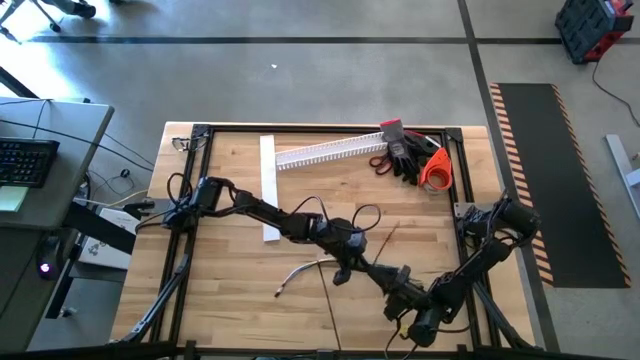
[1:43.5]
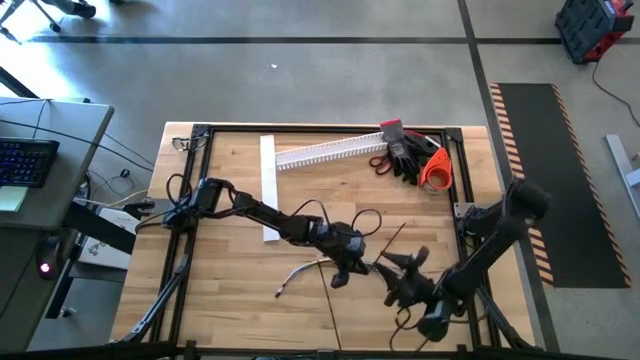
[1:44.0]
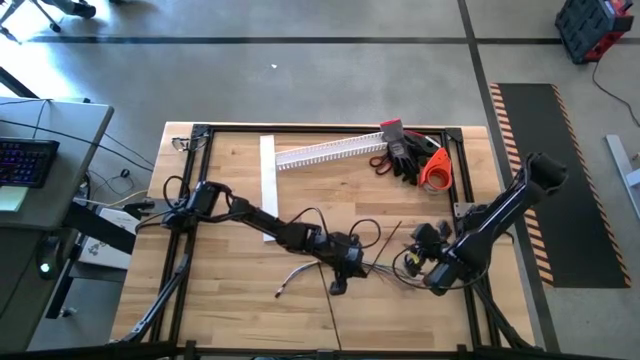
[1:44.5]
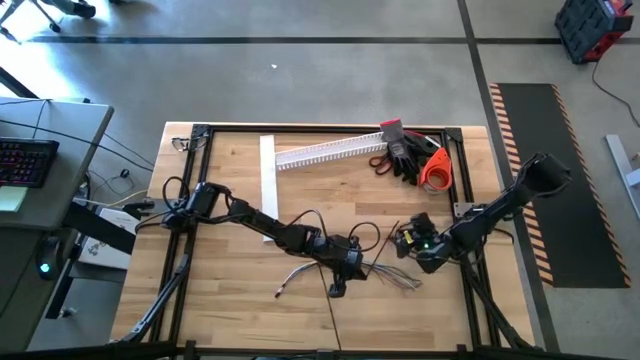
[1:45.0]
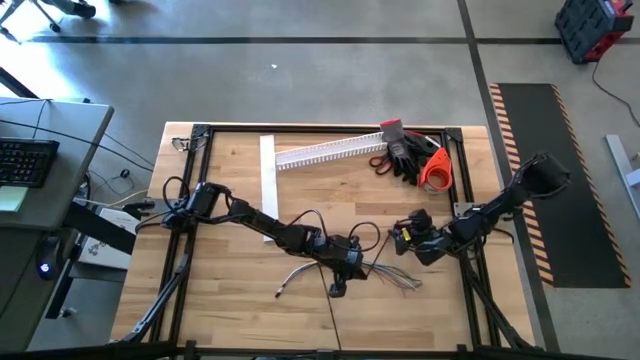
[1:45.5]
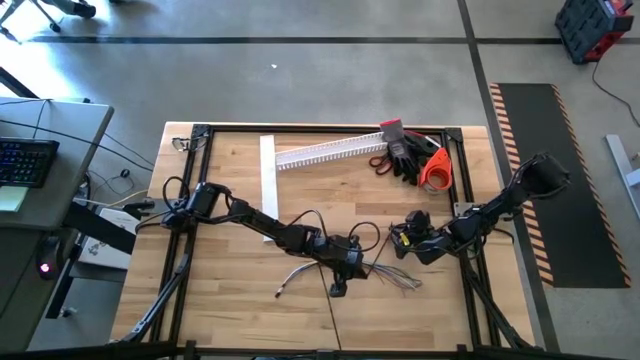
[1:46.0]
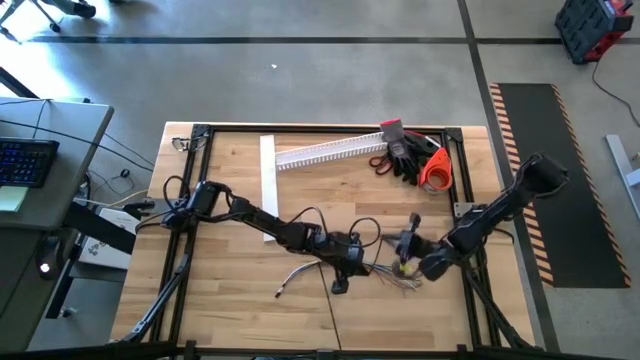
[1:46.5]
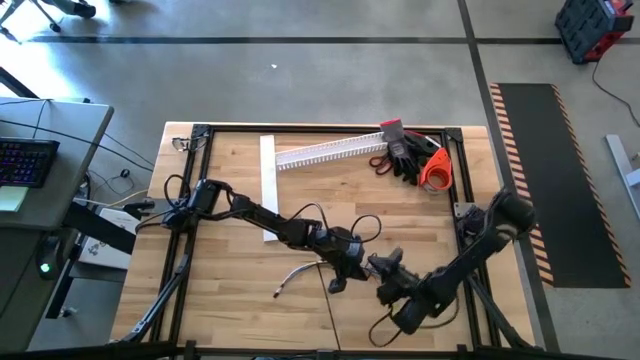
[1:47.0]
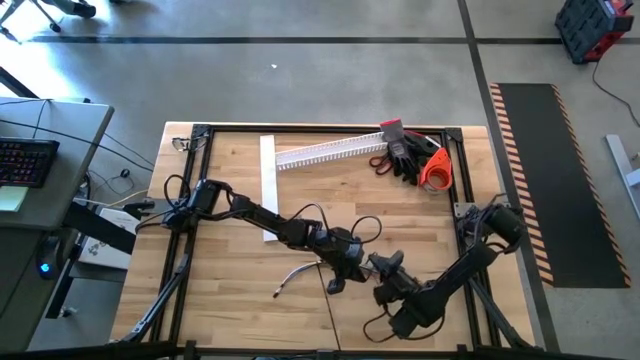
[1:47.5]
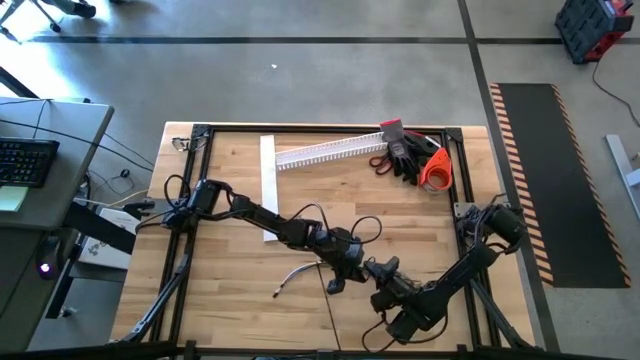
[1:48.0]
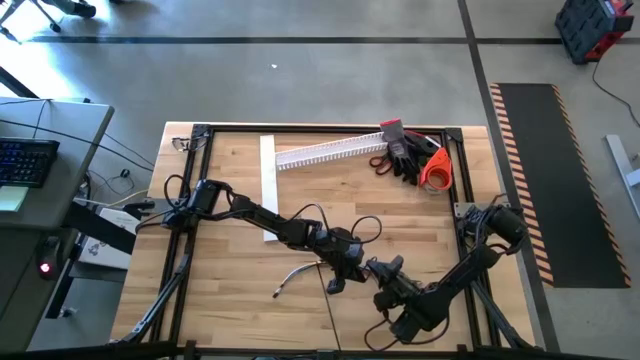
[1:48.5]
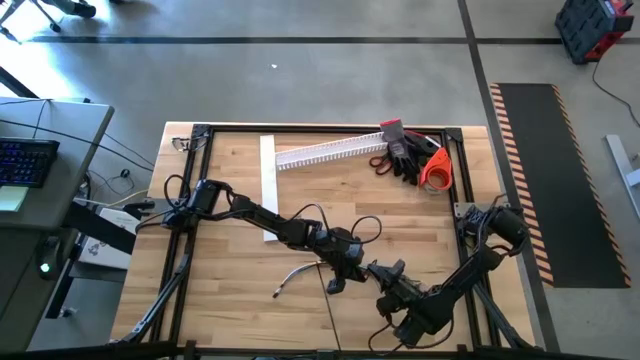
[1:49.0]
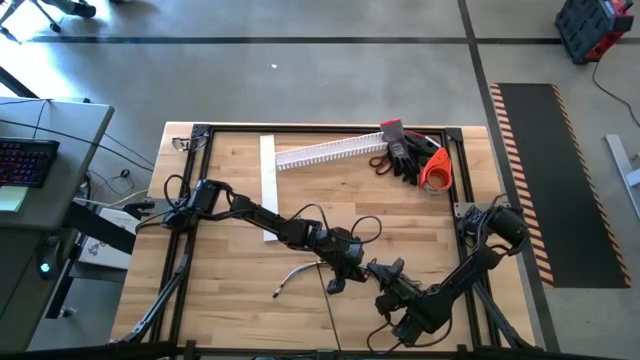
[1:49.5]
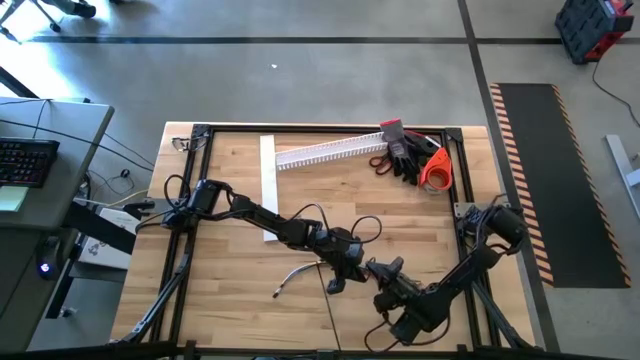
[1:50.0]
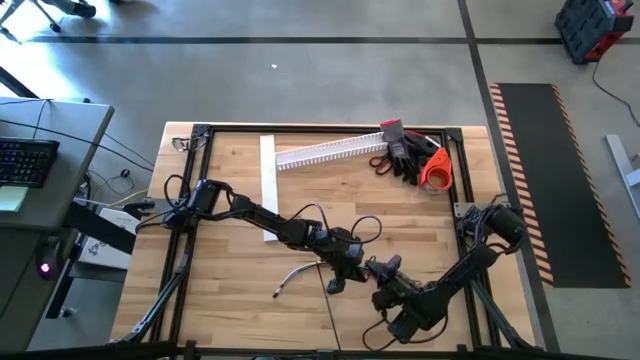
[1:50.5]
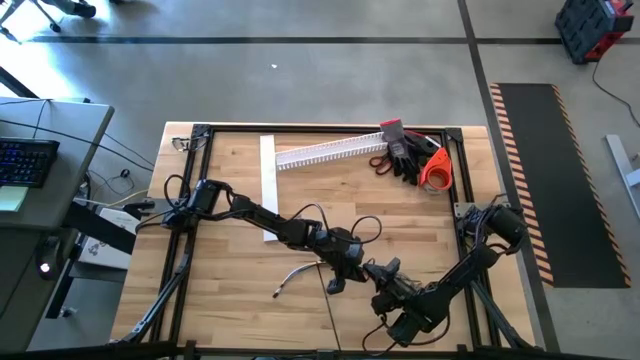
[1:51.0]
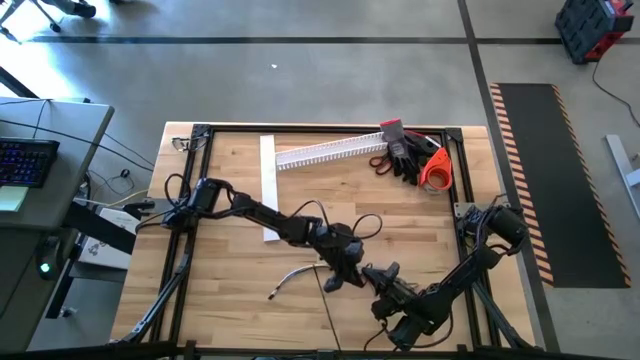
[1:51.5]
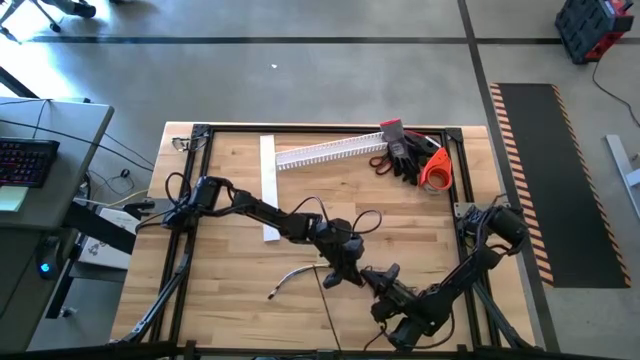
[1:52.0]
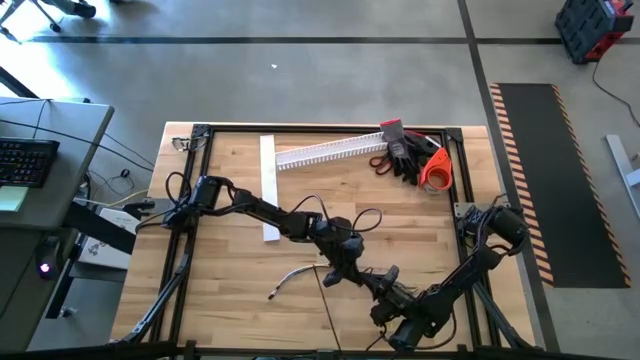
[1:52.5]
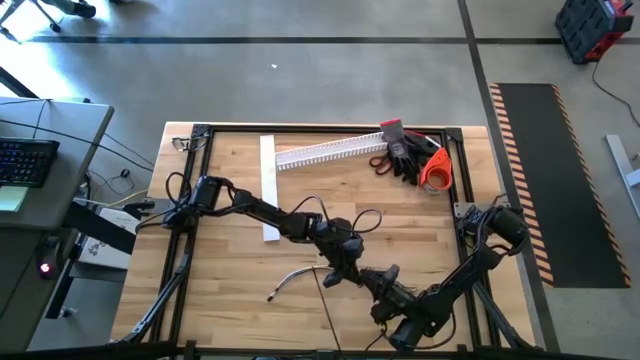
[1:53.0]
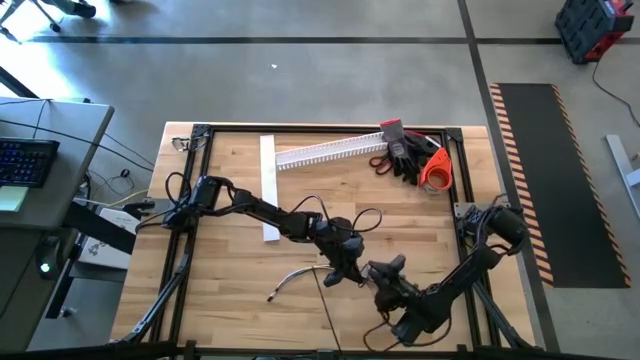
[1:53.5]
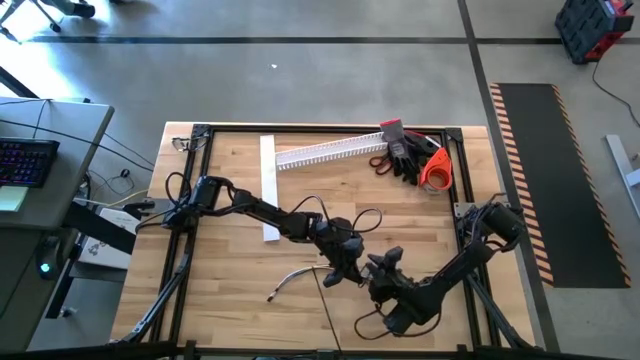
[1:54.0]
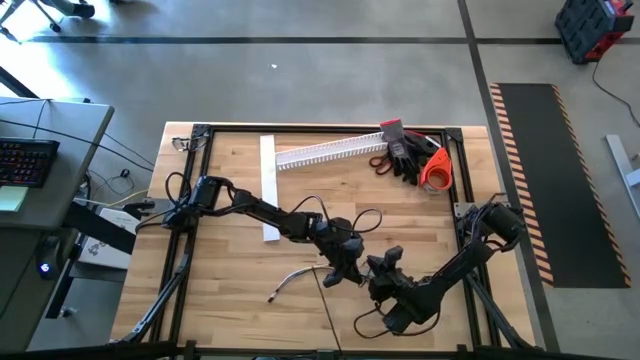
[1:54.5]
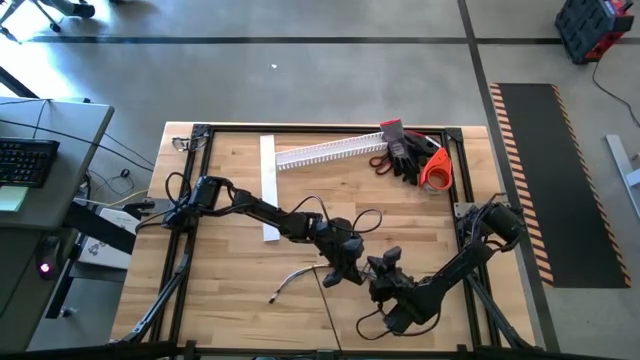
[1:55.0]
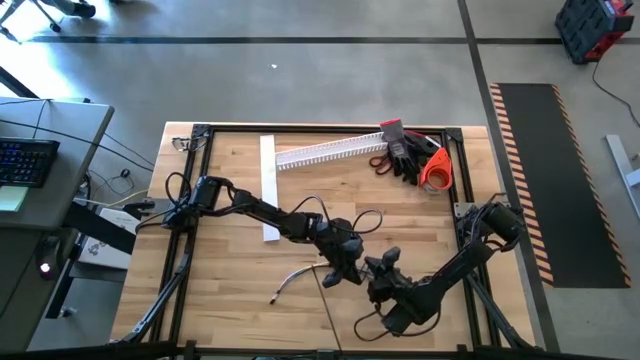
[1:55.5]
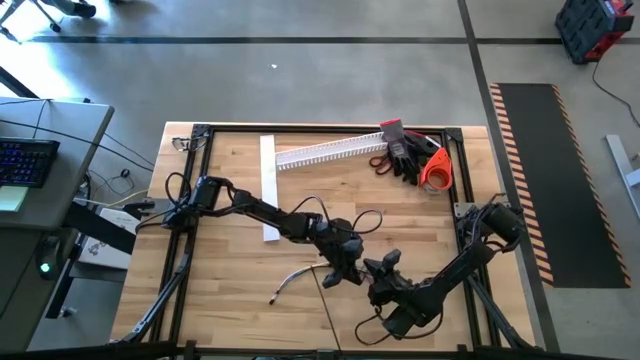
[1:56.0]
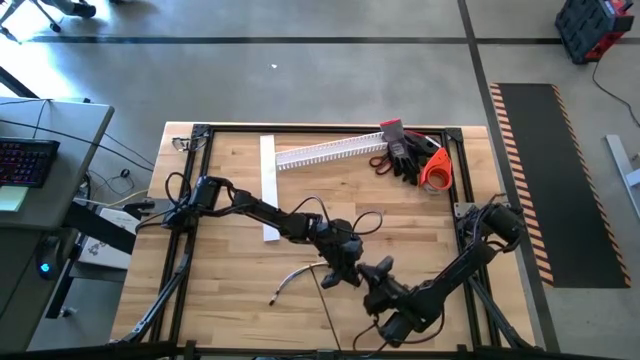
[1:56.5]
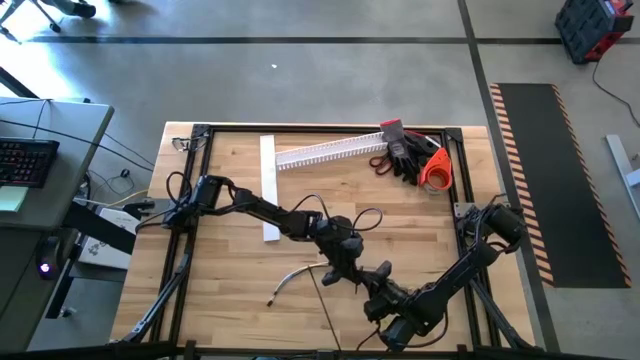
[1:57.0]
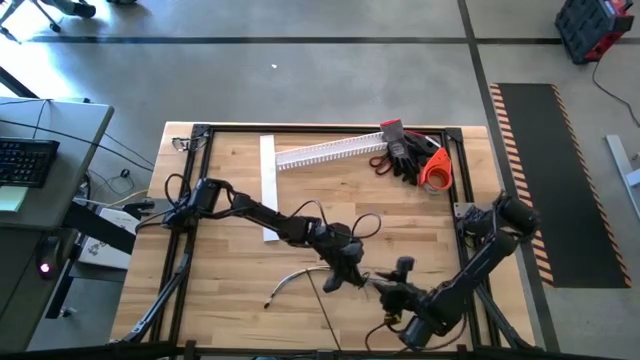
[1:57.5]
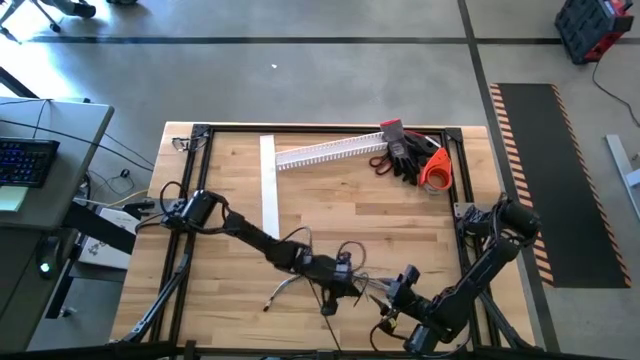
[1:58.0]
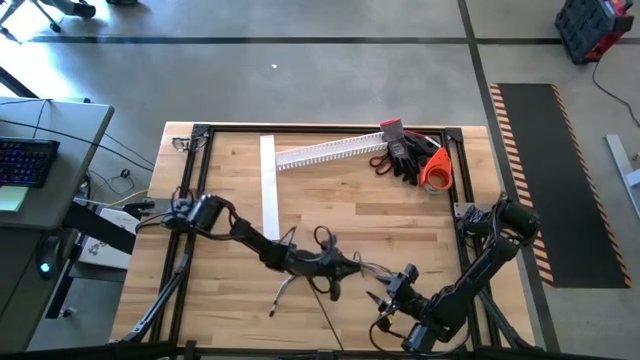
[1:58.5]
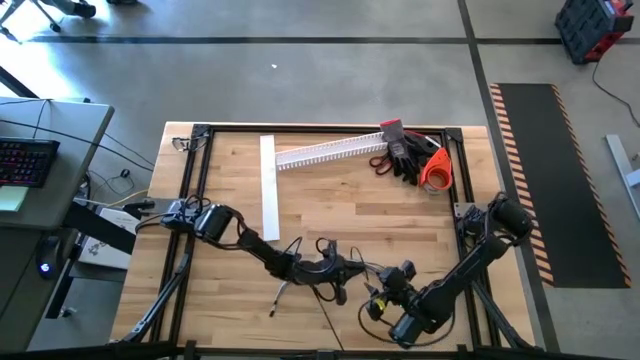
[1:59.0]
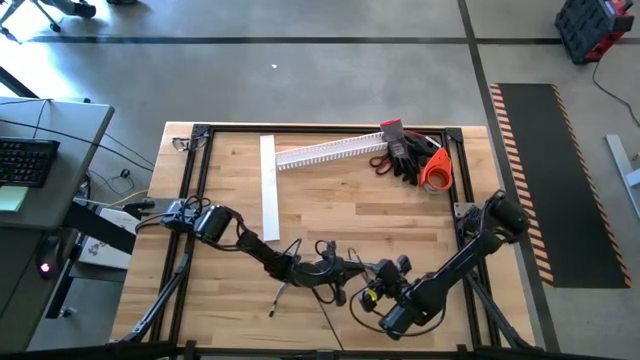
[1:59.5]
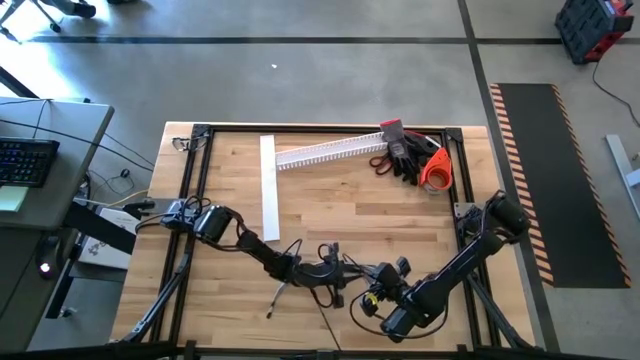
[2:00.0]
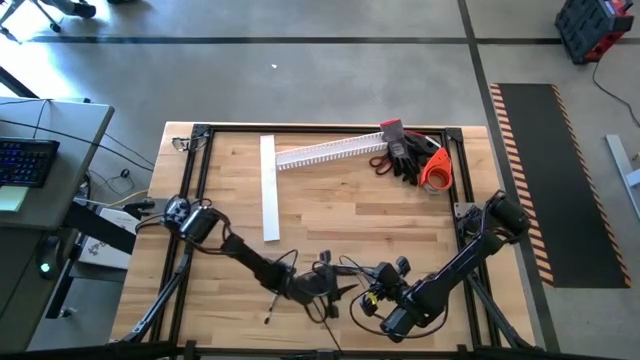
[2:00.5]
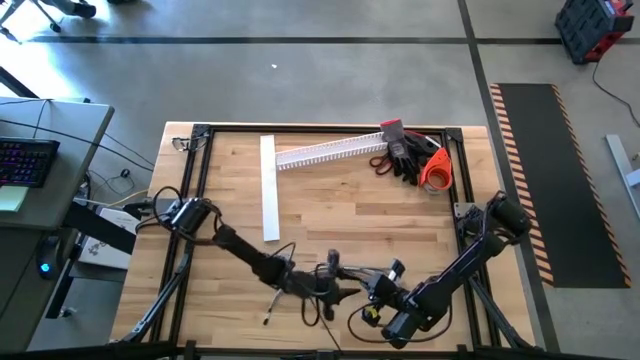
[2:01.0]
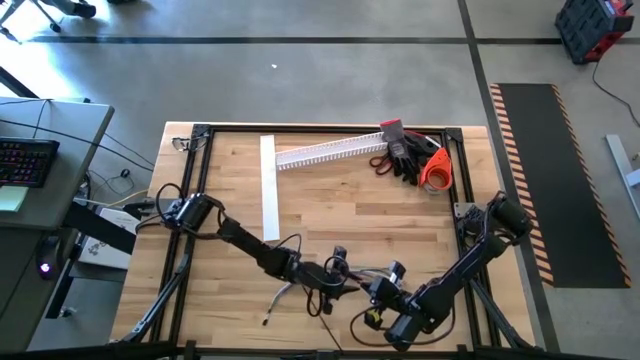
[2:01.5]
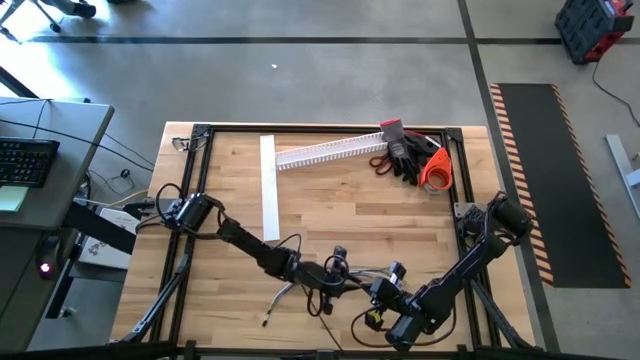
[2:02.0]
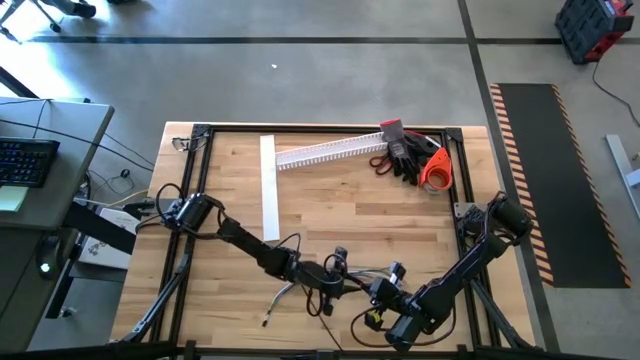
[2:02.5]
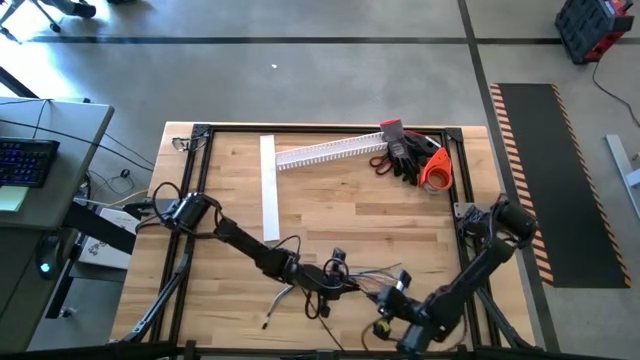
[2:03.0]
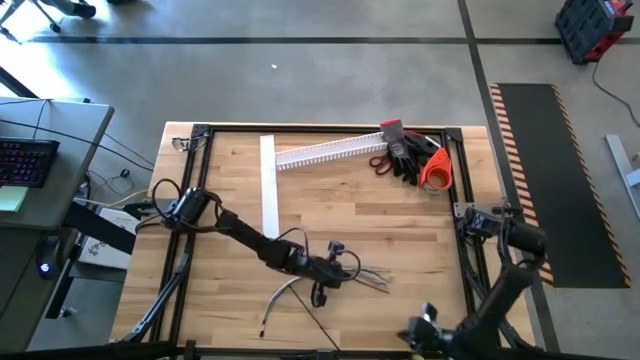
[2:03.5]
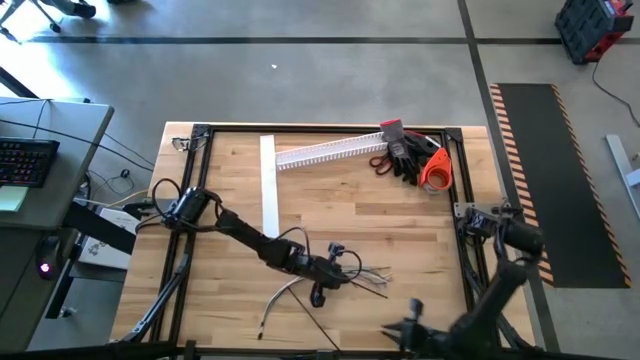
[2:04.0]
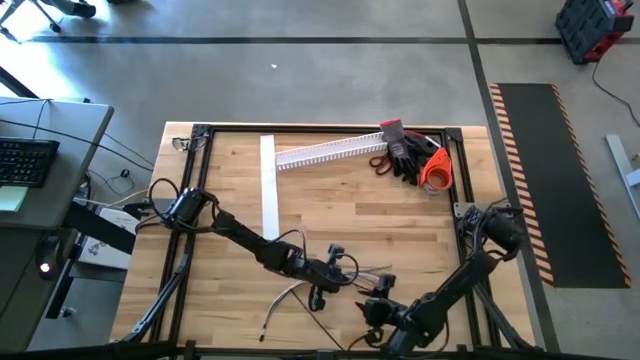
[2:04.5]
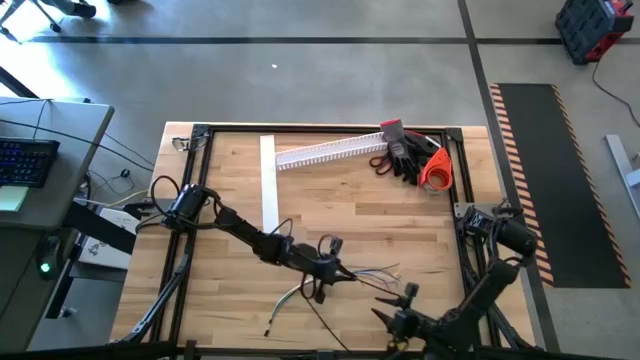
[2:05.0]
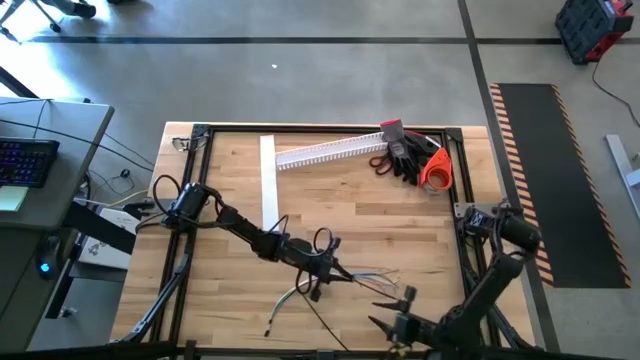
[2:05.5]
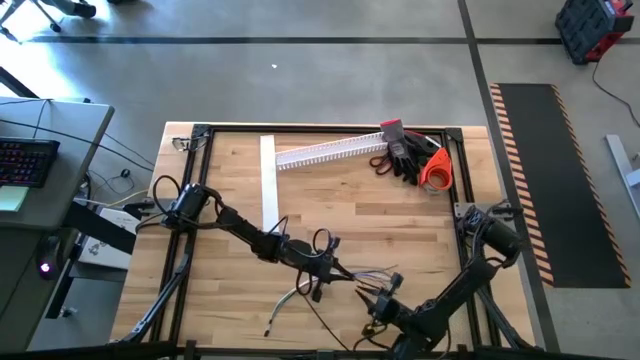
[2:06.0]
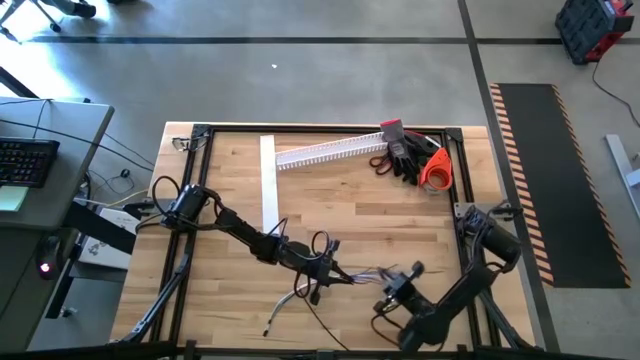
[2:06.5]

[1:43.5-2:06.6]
Task: Ziptie cables
Wrap the cable wires with the black zip tie
